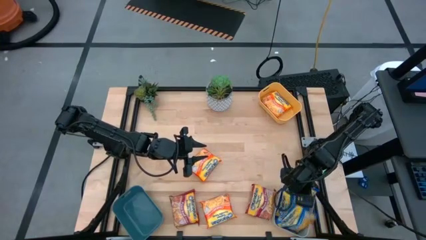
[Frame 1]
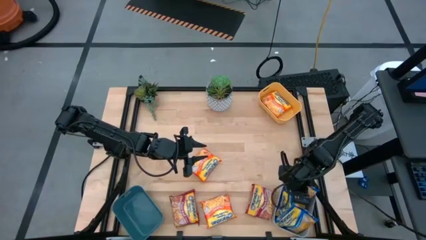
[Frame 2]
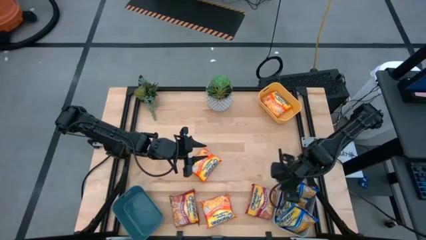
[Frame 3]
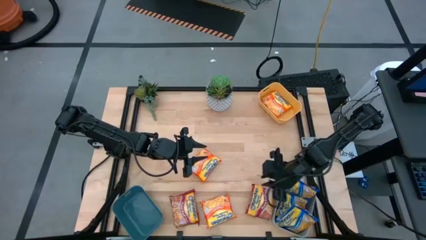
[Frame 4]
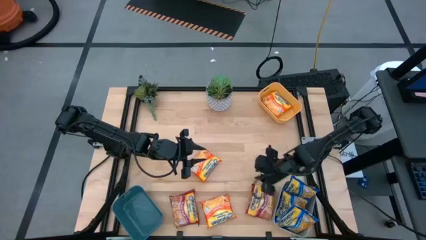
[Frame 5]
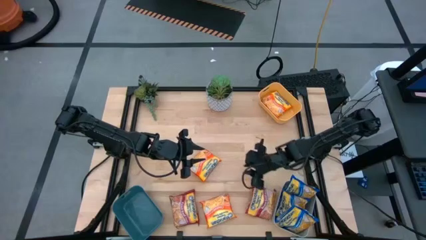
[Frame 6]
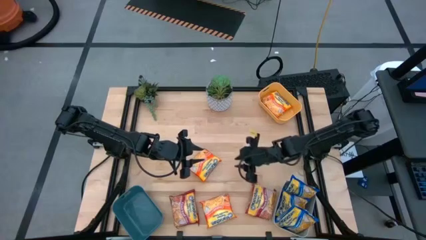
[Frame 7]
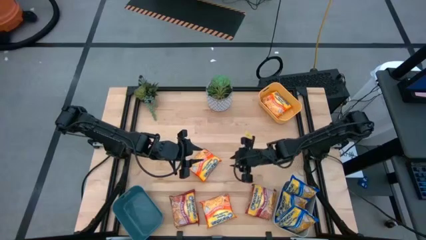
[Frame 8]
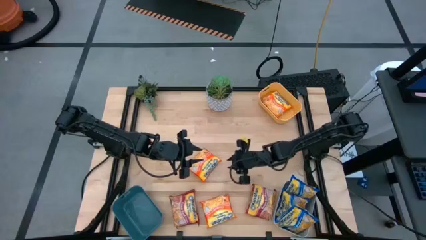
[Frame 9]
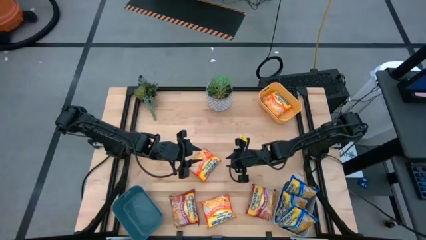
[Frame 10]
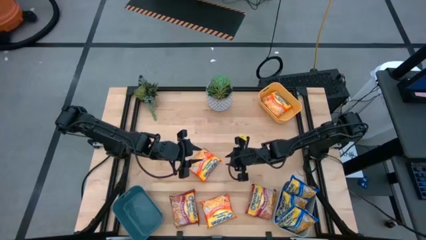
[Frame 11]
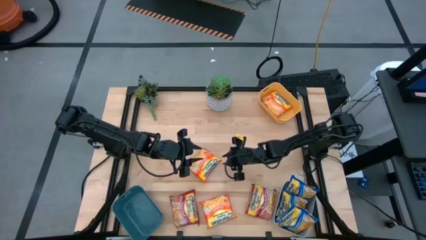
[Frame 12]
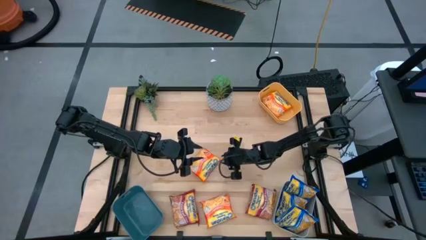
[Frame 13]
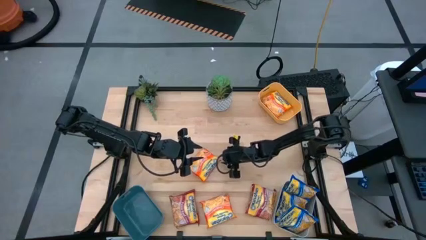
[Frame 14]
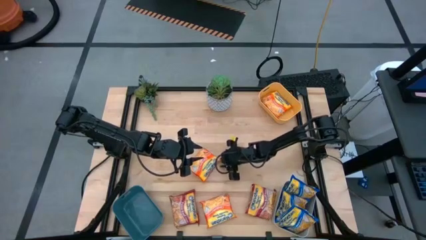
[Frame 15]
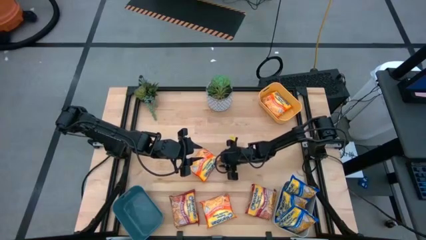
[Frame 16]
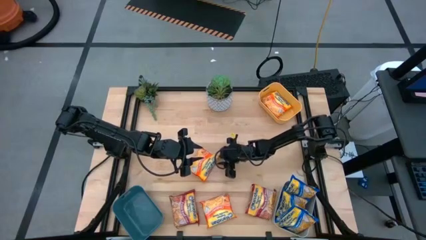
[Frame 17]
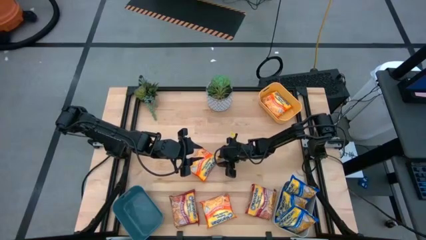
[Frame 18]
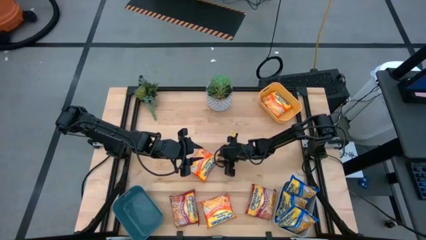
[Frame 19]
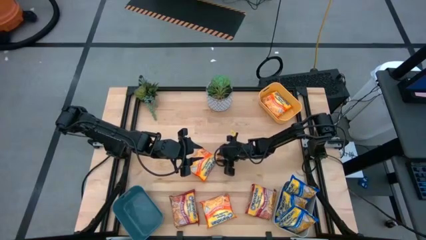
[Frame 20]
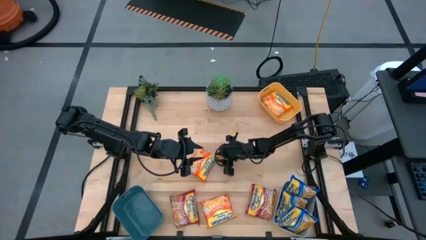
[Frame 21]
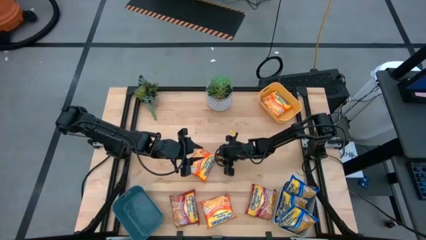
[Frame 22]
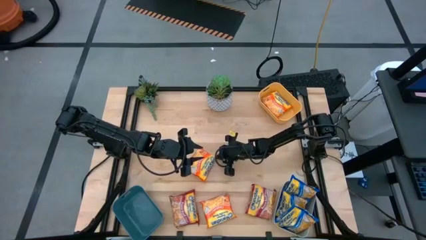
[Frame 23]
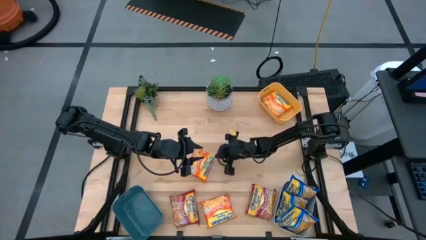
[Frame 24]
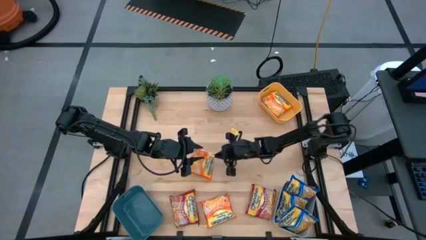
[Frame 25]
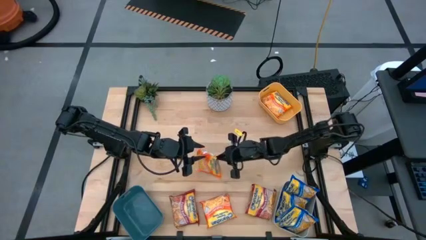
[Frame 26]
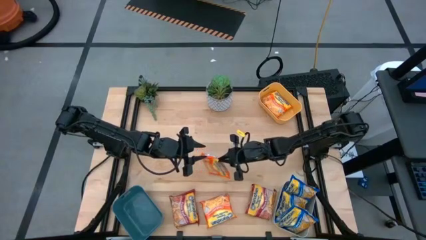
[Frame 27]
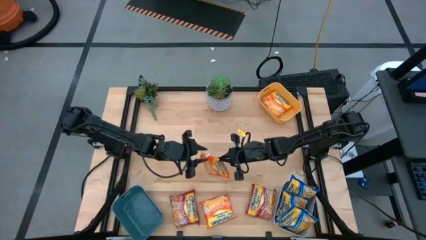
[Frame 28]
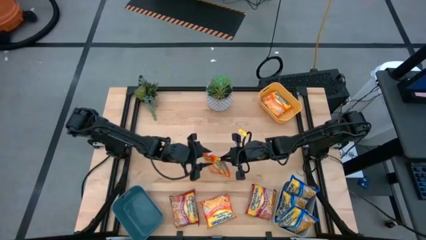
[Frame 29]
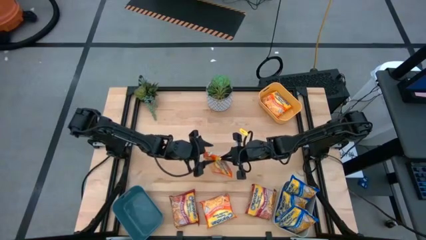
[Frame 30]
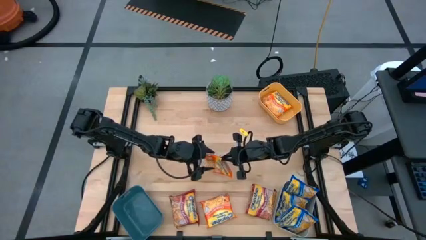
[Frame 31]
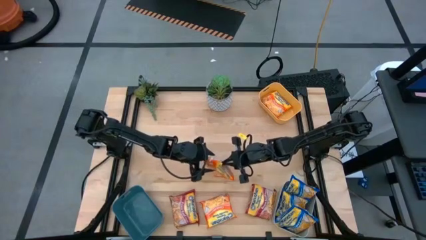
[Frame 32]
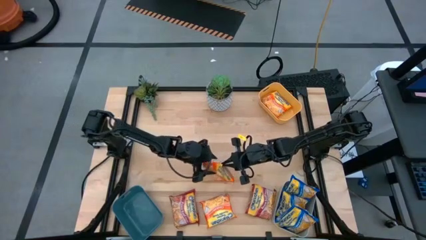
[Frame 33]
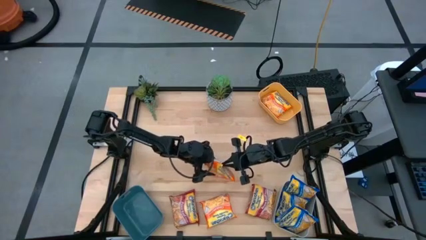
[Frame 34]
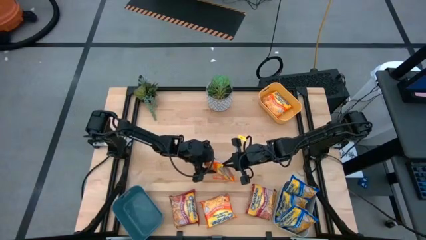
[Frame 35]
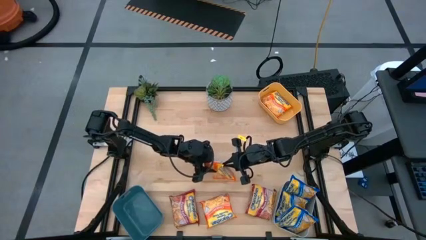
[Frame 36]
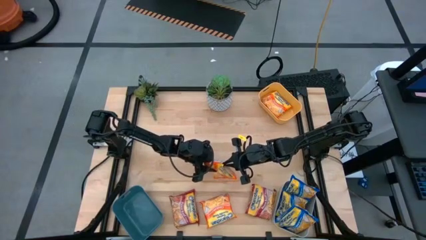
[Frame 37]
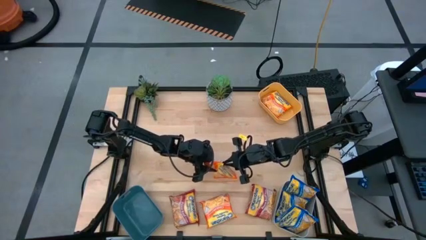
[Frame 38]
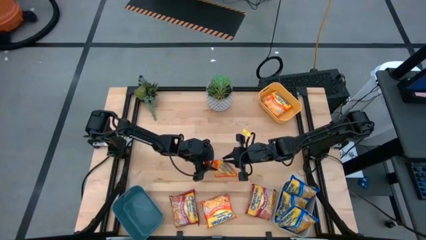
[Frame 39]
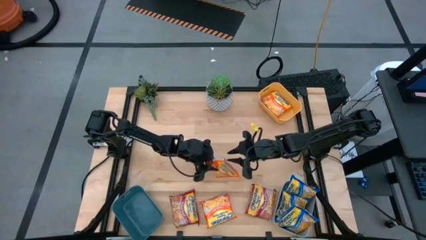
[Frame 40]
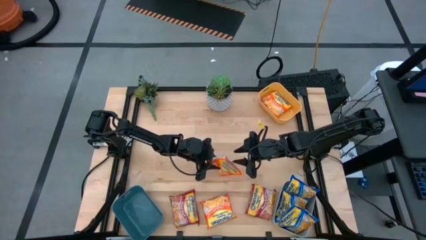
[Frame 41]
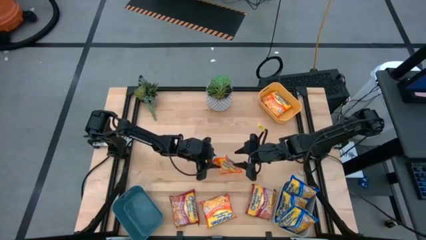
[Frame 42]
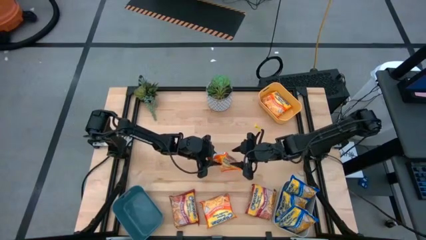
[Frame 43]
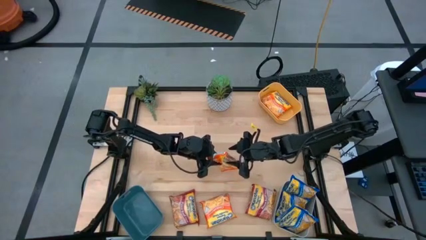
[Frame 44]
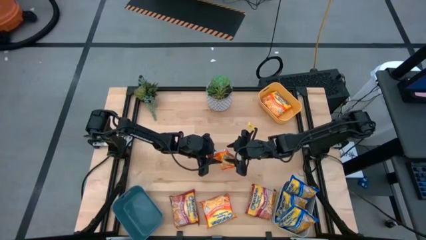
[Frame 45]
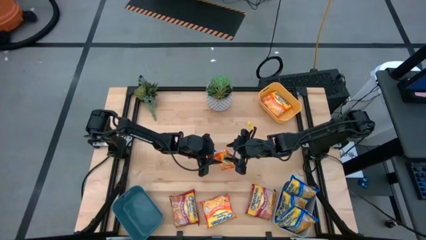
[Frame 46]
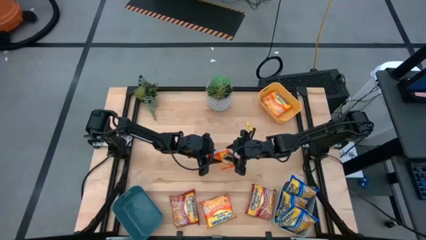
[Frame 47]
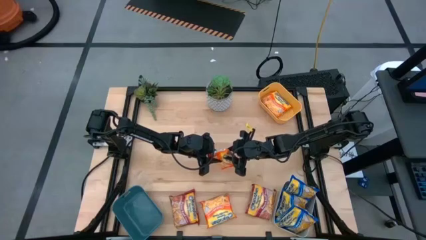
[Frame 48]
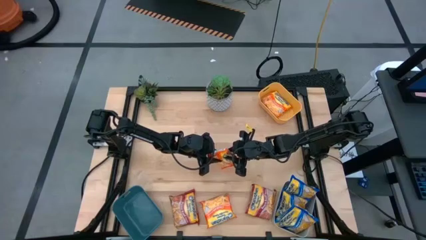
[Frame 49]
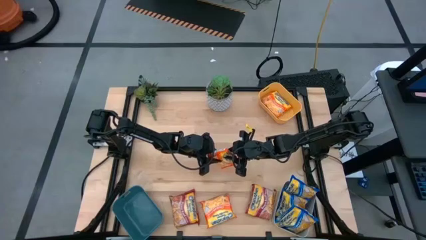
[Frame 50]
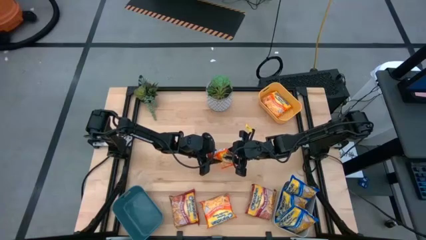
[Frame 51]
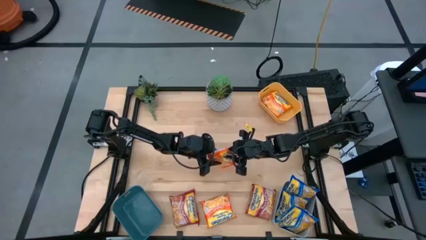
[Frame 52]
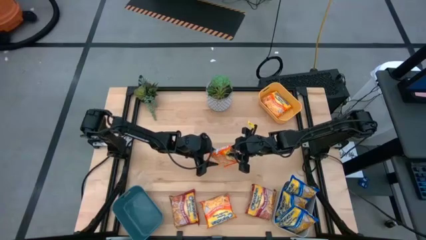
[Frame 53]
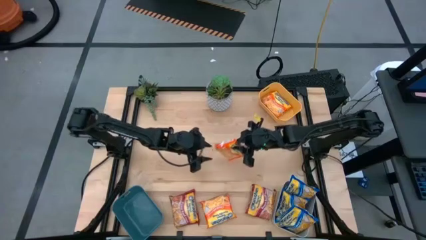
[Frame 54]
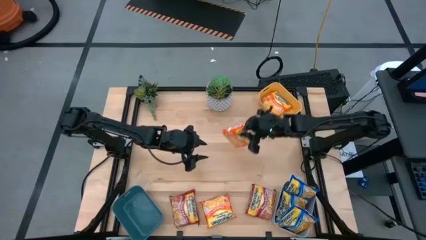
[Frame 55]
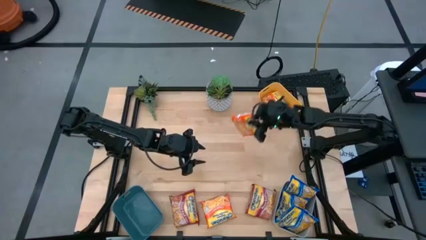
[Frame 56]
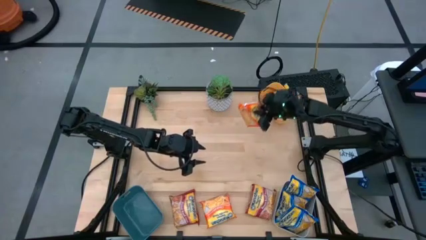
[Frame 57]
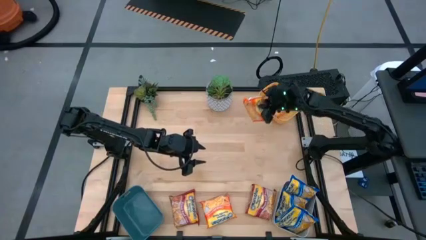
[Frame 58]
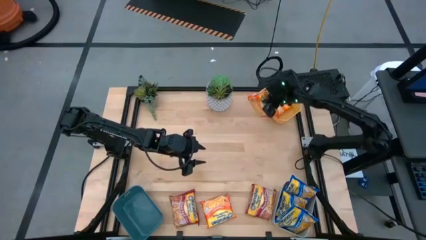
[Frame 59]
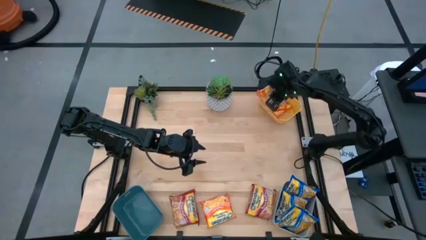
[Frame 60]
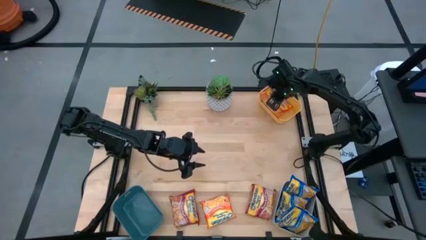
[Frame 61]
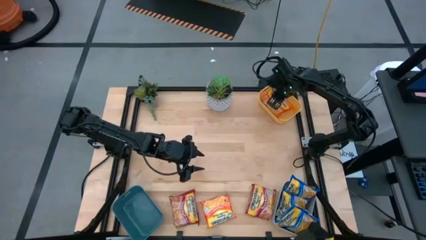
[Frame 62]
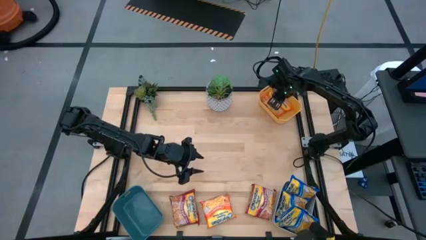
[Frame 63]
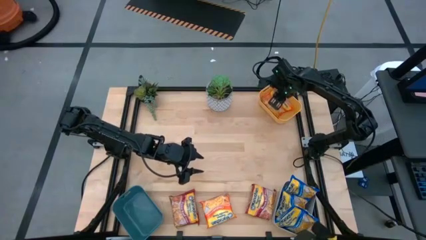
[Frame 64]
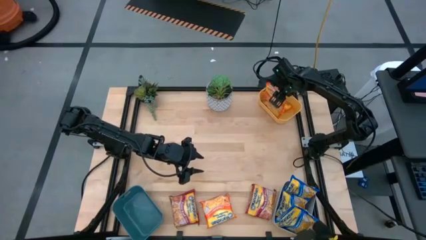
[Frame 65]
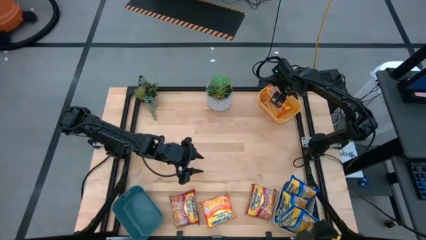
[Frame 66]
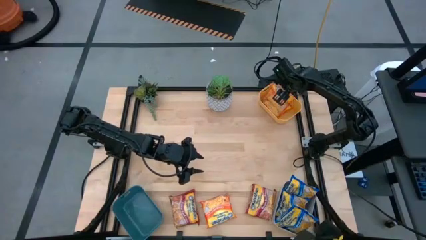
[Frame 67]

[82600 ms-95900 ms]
Task: Sort Maruchan noodles
Put the top orange noodle pack into the yellow bin

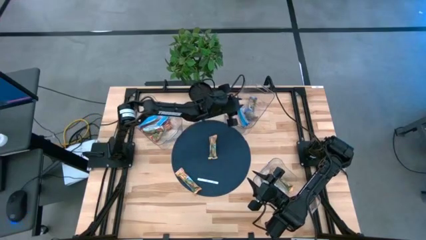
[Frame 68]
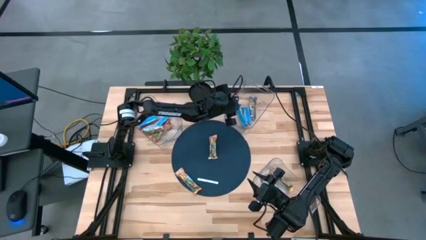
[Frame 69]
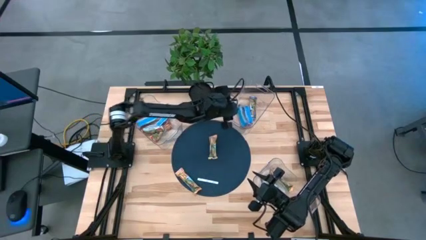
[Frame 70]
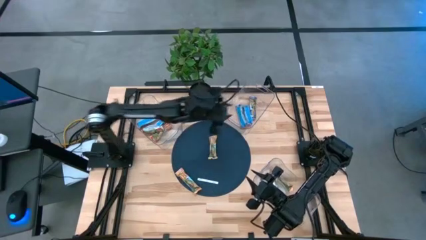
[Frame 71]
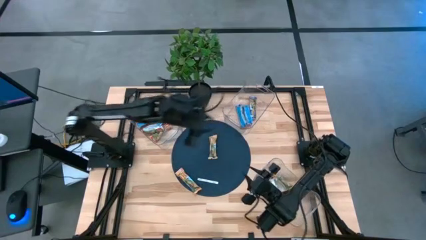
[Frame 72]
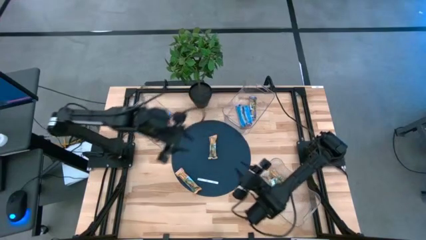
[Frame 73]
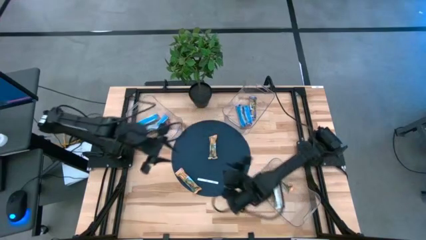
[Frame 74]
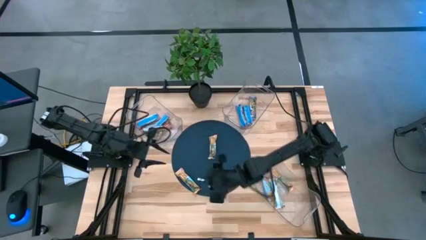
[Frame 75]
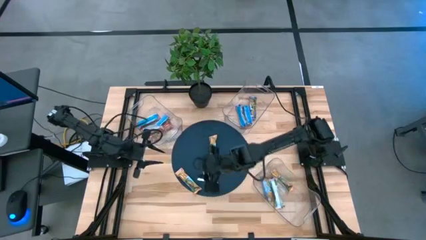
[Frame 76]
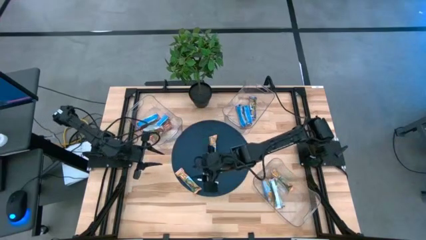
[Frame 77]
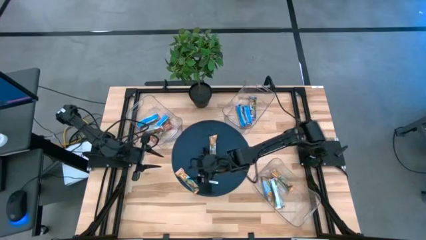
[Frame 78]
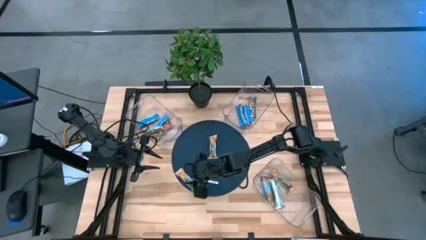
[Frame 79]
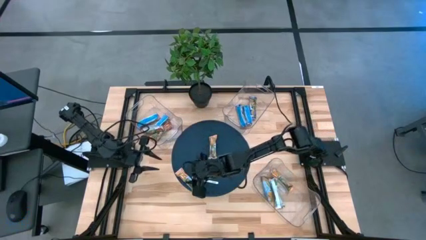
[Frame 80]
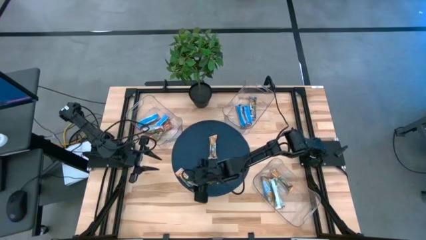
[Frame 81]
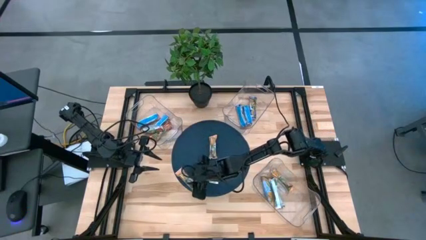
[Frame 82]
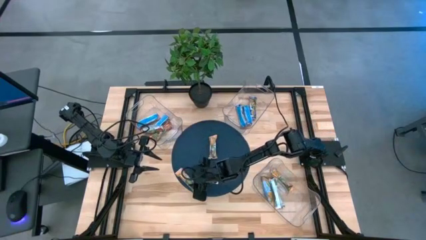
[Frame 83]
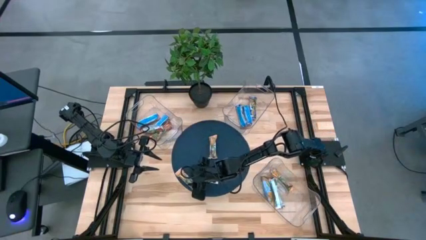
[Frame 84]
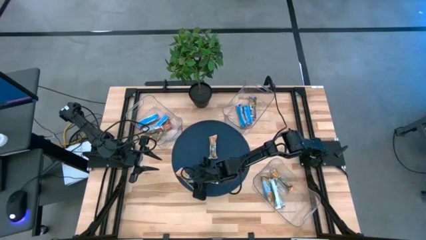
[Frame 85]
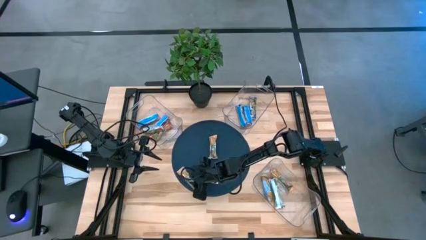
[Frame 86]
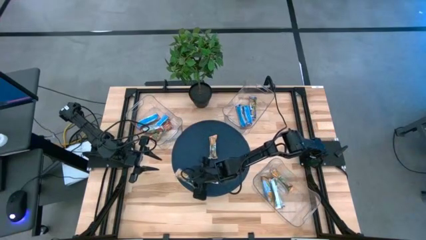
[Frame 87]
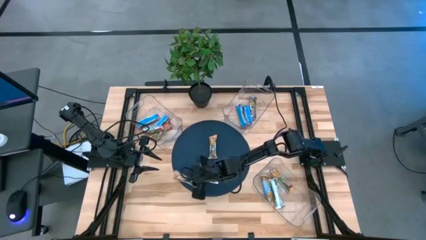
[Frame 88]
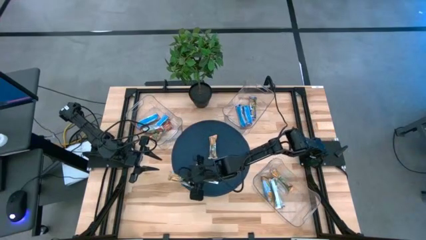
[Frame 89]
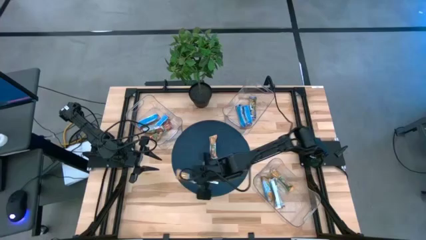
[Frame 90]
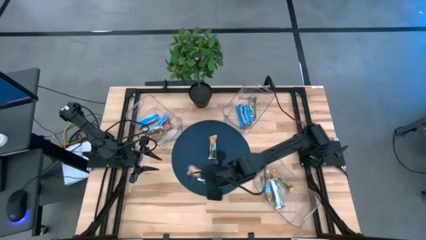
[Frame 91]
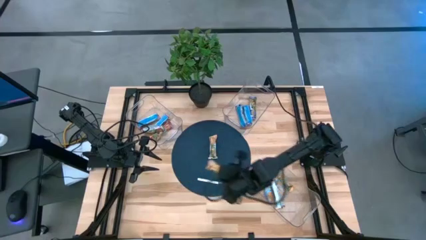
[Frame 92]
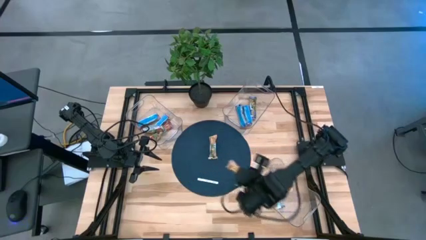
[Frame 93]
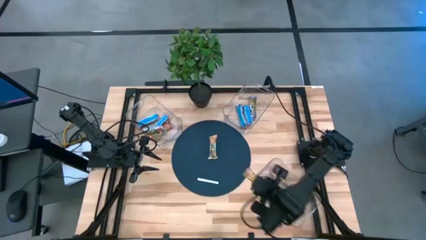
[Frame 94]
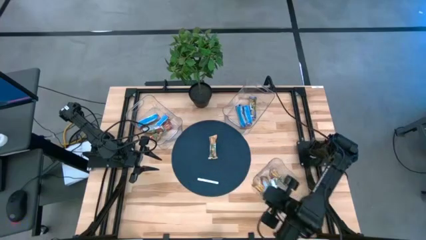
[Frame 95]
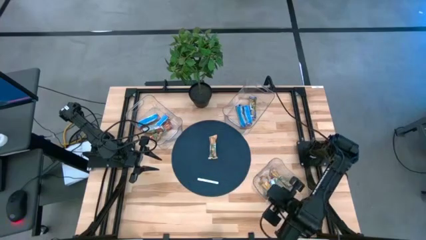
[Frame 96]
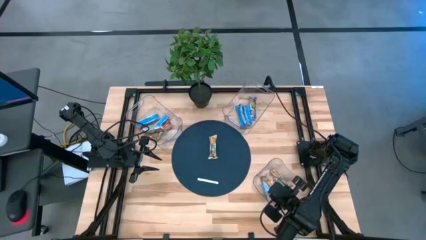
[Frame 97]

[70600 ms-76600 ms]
Task: Pick and place Granola Bars by type
Put the yellow granola bar into the bottom transparent bin
